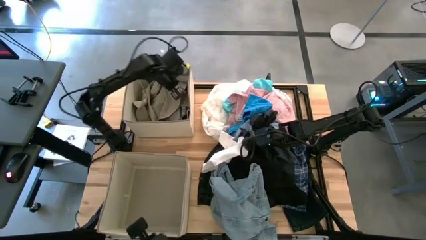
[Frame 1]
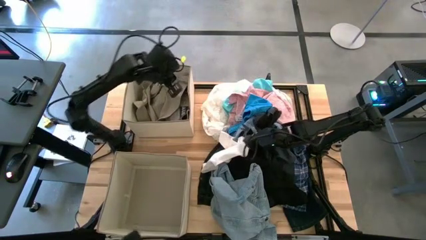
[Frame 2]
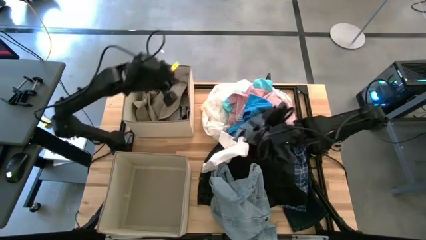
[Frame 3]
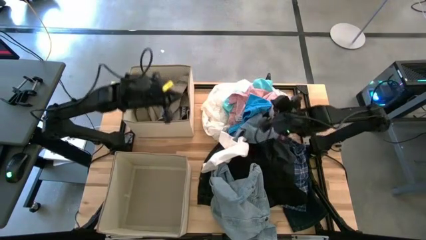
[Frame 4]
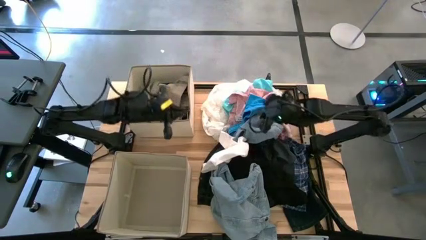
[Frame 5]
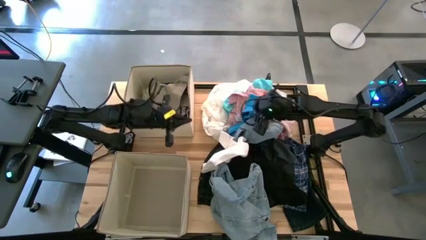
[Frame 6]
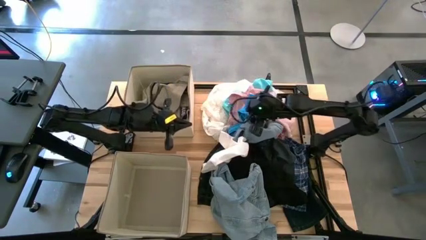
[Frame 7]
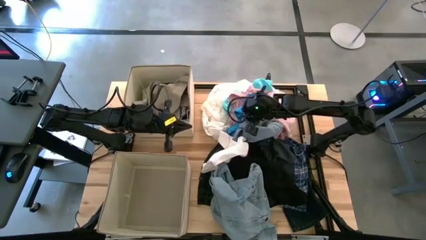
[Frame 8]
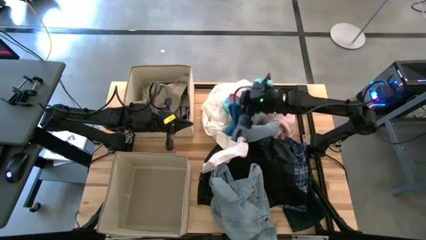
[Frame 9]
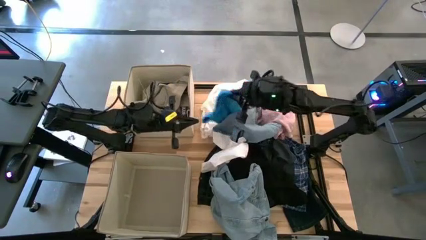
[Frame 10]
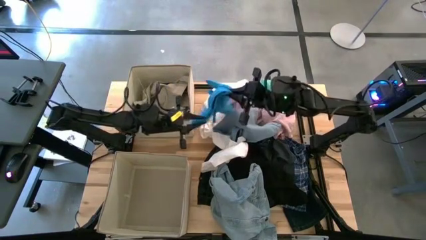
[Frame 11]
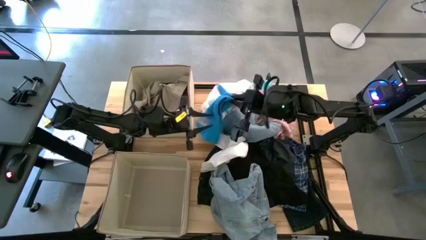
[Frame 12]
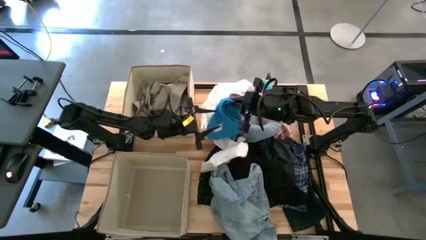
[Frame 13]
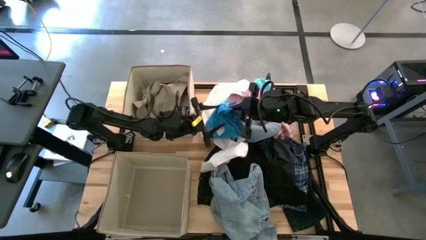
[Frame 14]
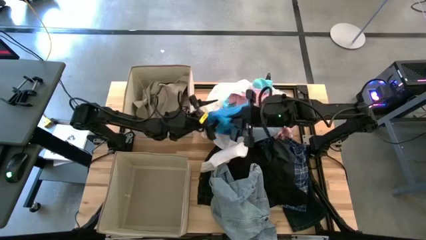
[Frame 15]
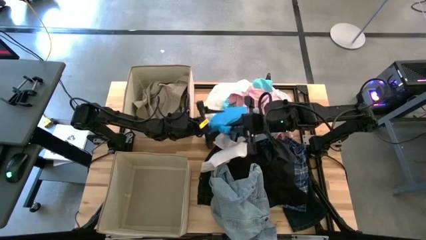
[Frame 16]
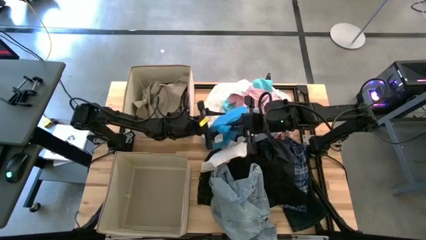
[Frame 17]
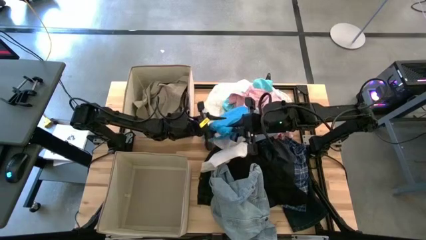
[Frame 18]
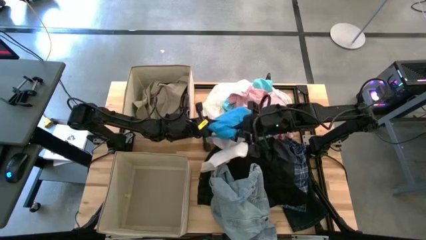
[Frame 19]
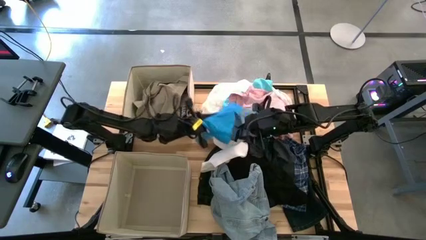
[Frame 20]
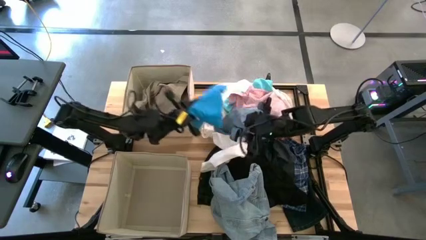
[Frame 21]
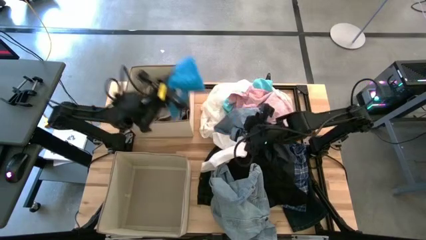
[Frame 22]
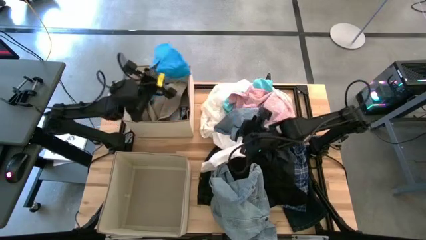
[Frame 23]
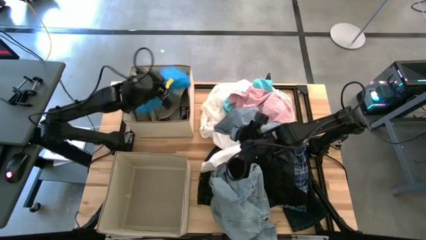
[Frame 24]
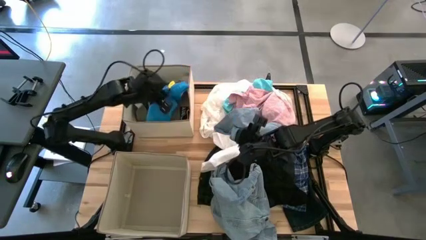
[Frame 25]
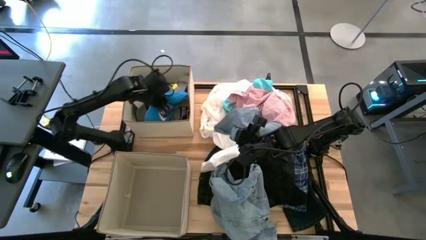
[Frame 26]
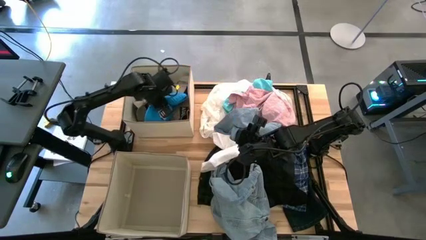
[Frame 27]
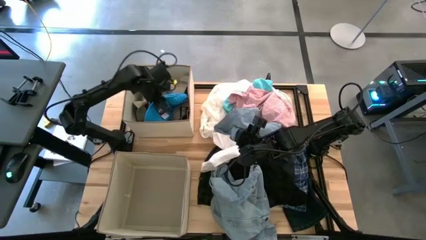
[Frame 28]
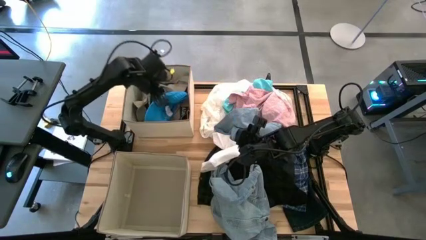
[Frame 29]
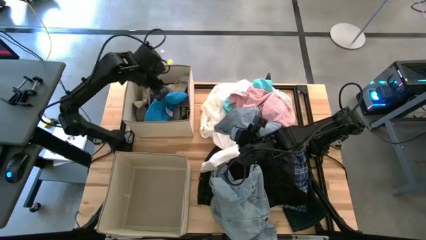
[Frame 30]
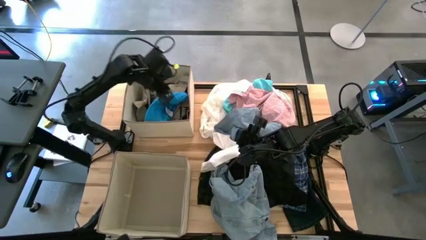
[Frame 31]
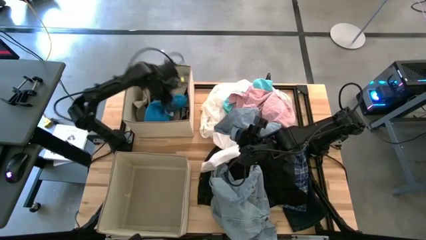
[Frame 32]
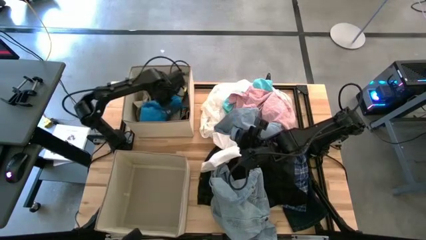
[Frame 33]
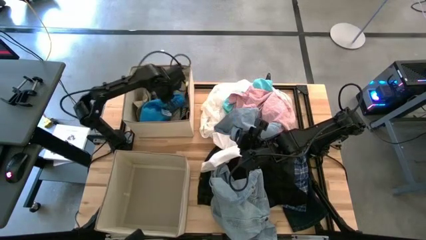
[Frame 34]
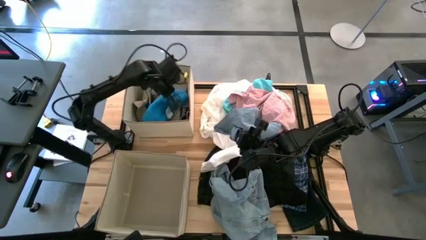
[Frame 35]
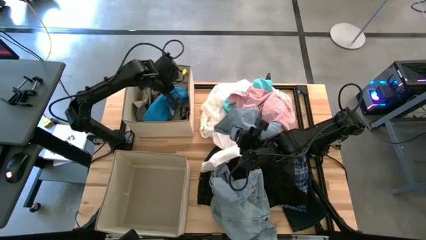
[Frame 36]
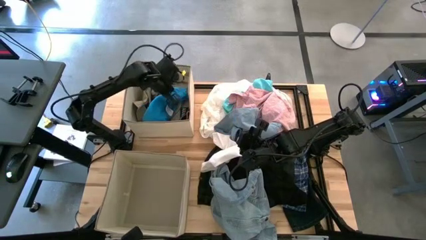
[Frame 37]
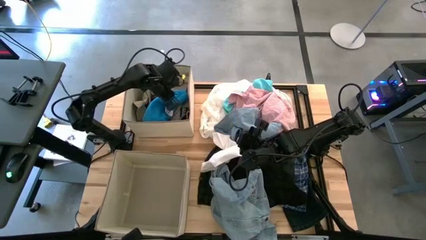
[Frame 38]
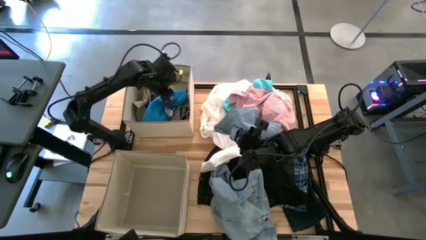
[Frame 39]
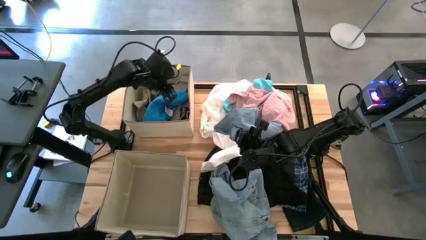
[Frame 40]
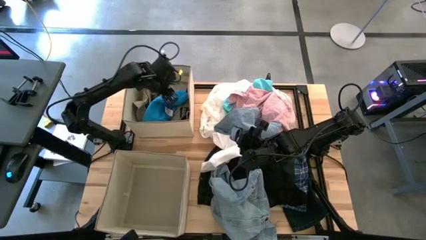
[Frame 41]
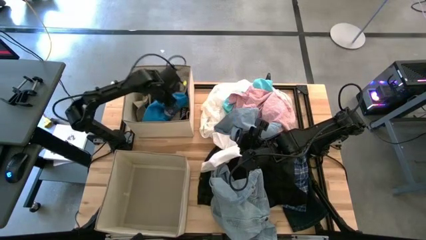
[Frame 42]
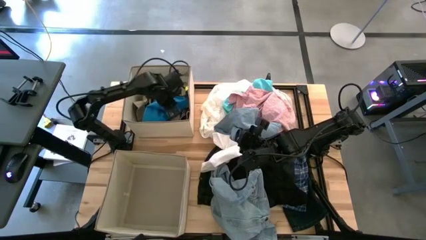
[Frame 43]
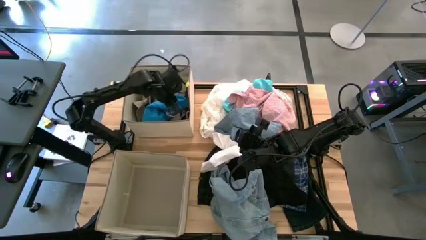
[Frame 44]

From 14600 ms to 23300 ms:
Task: Sort clothes
Put the blue underwear into the top brown laundry organizer

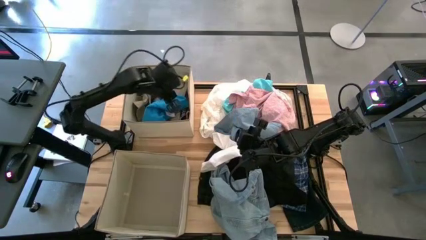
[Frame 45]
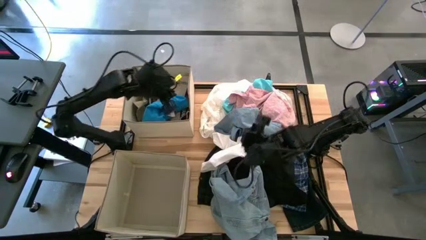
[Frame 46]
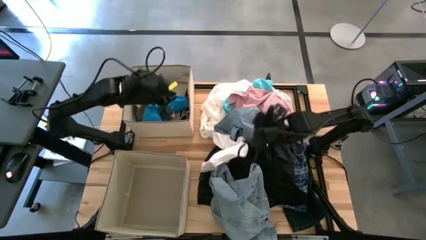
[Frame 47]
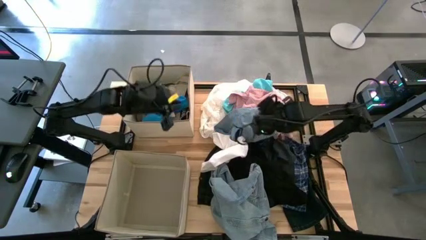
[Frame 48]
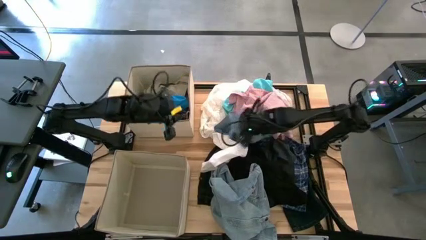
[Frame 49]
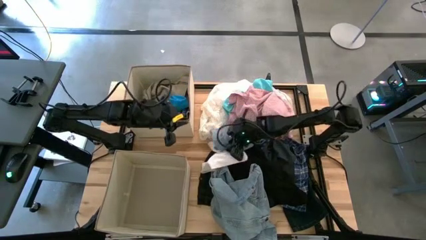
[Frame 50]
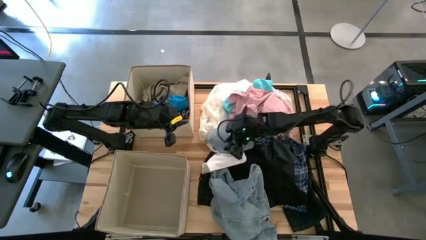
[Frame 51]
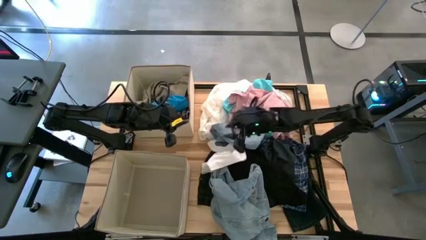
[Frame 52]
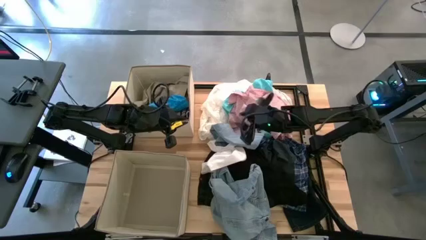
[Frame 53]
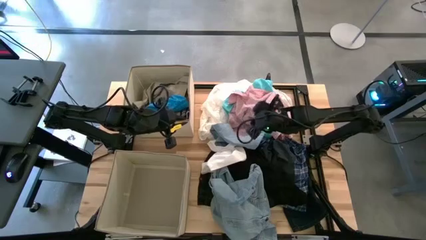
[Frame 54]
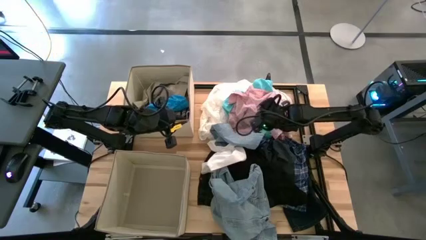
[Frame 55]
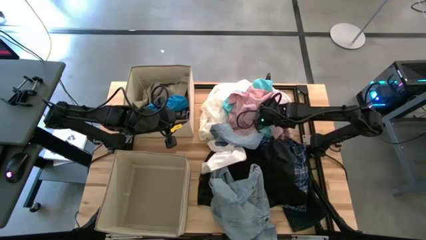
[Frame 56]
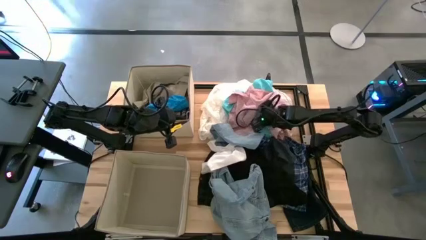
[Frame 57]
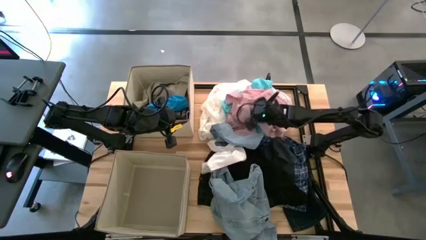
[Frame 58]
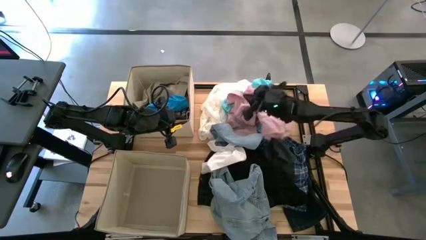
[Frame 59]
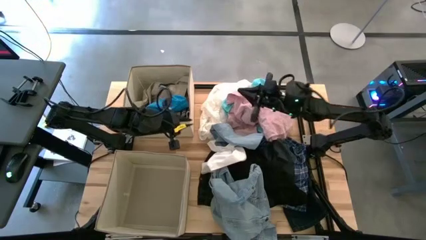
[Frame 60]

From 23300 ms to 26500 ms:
Put the pink shirt into the top brown laundry organizer

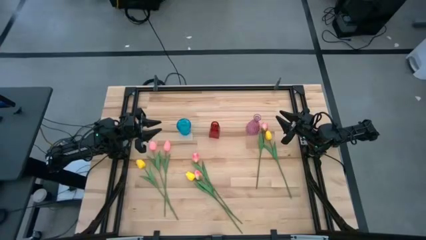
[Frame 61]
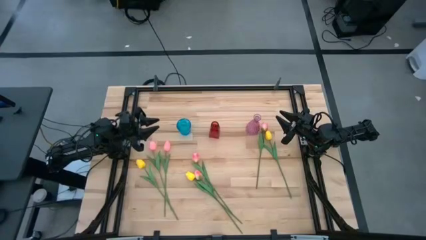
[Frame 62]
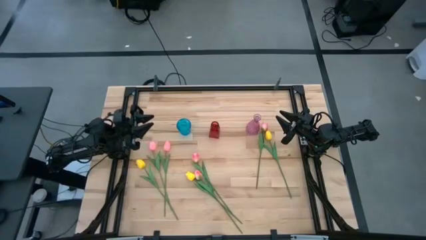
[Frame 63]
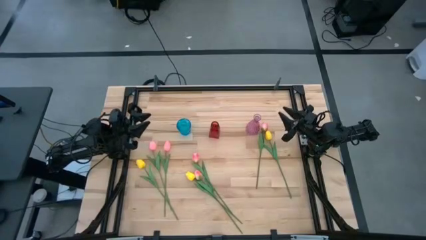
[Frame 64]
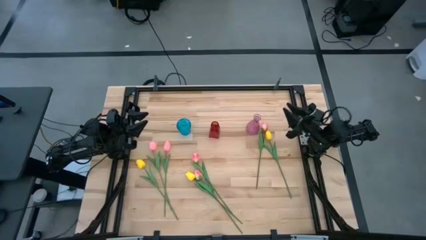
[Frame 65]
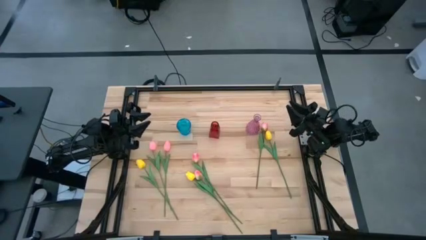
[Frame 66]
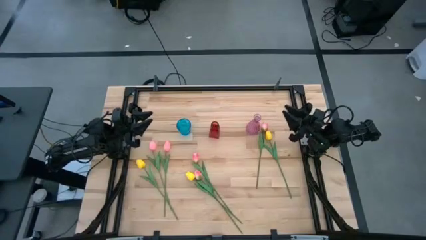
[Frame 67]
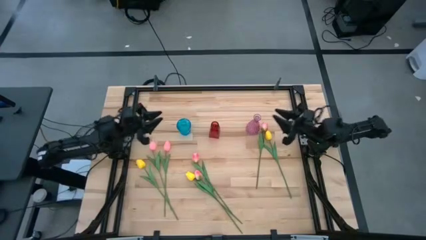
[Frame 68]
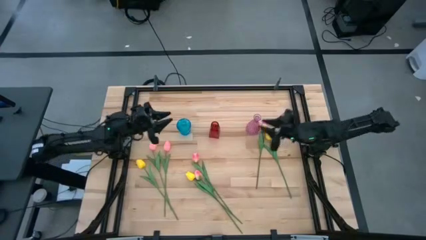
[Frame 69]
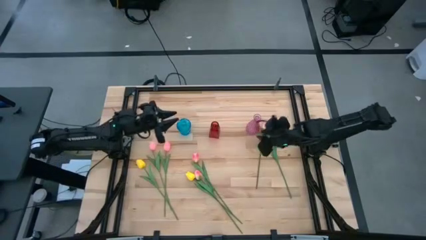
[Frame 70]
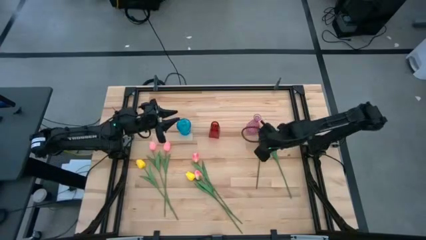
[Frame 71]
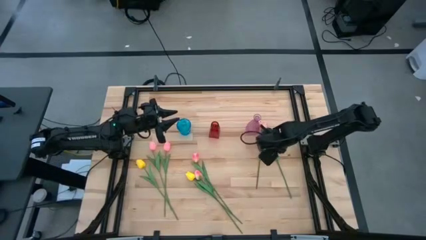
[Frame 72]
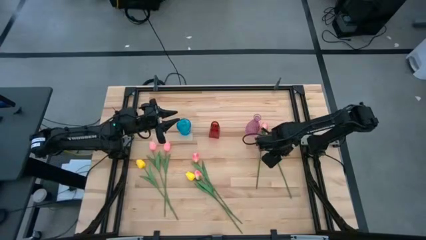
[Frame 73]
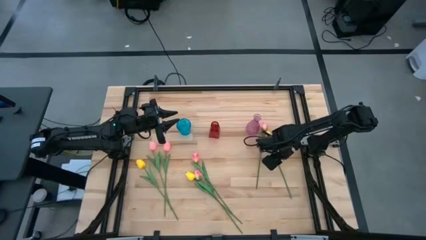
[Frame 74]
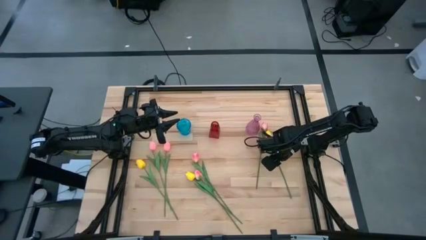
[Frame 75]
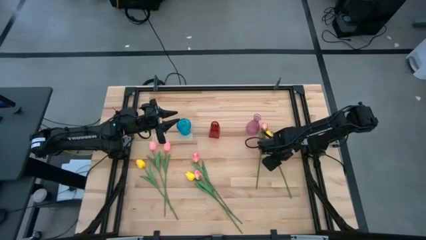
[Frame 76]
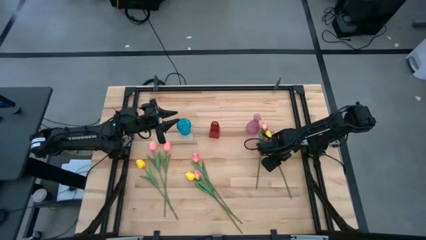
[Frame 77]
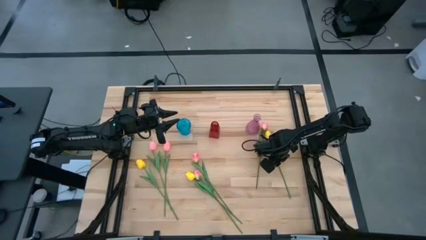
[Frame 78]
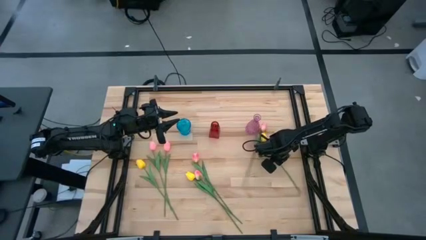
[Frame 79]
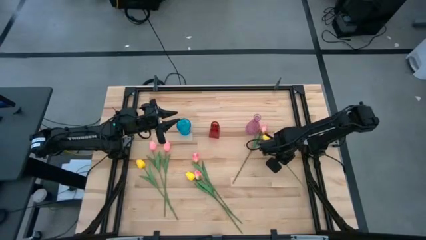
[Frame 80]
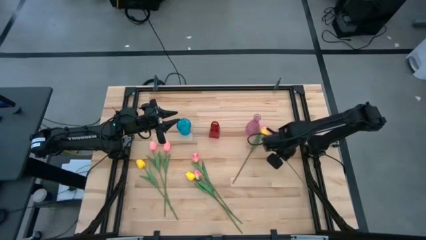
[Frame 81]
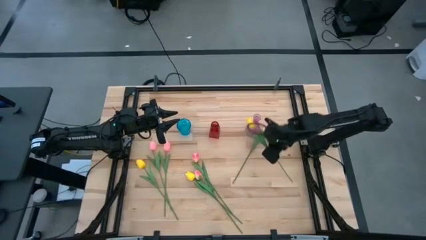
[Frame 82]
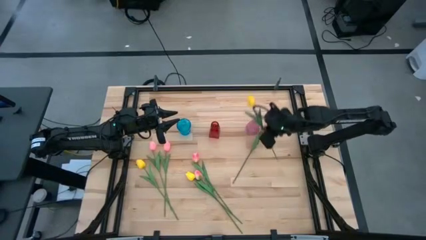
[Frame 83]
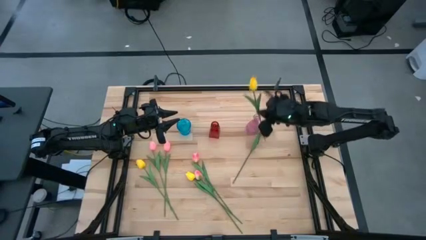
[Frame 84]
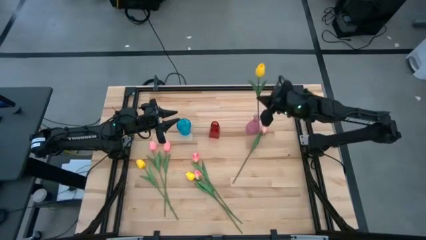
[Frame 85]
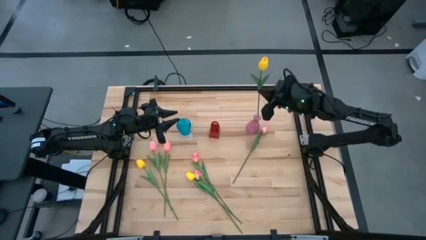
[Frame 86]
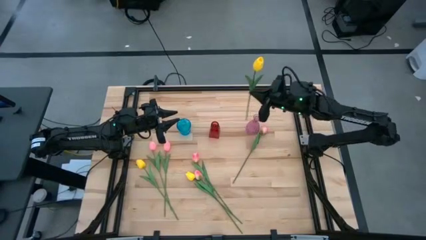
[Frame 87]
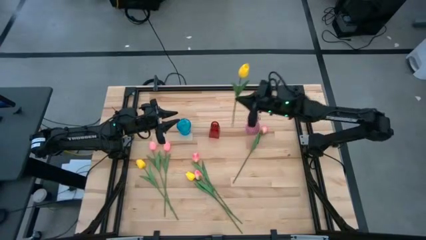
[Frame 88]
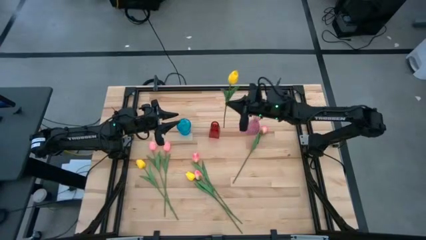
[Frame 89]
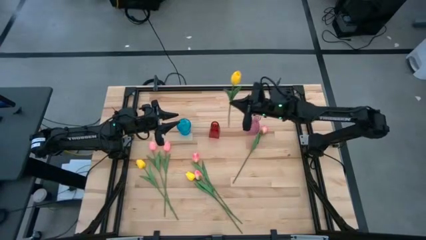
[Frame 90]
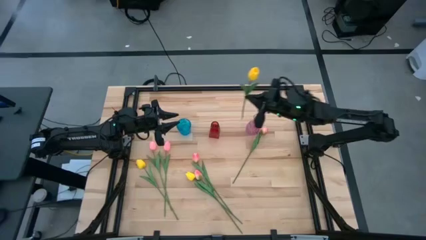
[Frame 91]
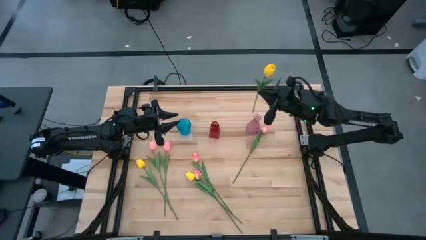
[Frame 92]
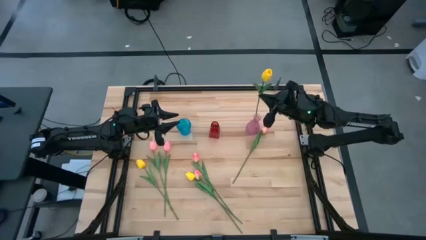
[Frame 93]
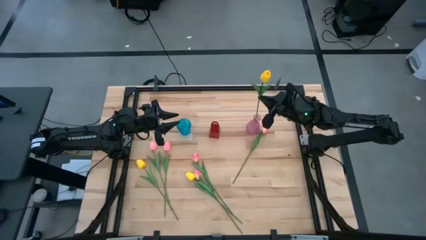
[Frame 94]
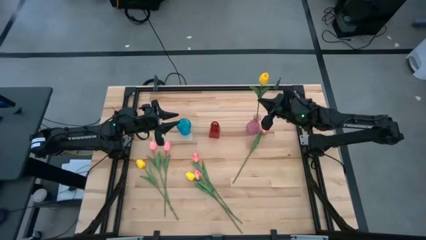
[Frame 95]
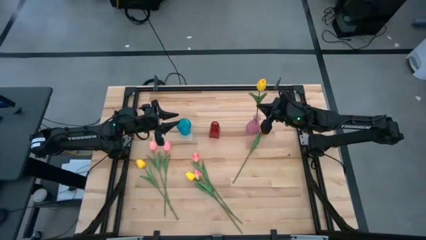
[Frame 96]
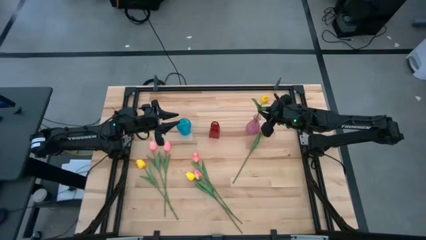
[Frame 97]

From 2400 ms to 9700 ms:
Task: Sort flowers into vase by color
Put the right yellow flower into the pink vase
